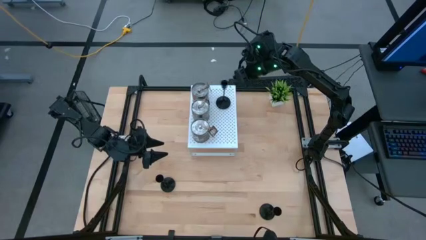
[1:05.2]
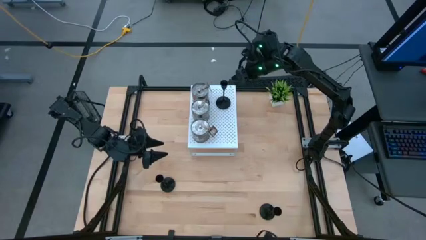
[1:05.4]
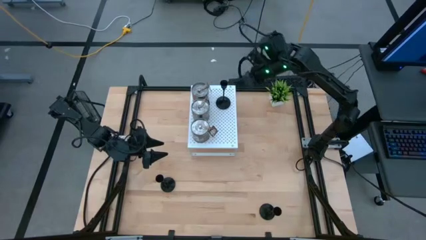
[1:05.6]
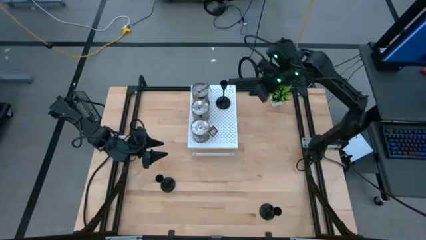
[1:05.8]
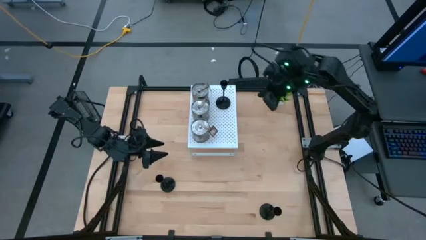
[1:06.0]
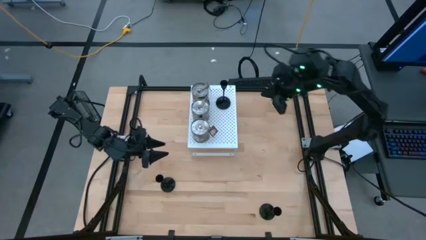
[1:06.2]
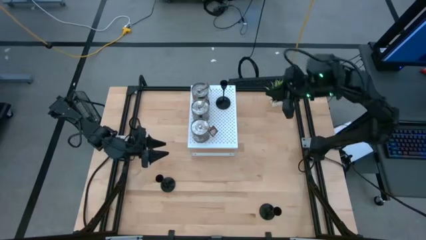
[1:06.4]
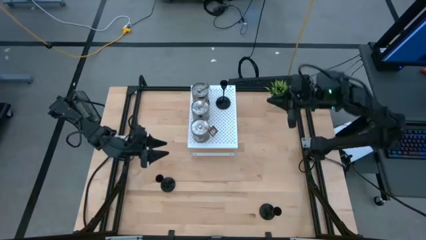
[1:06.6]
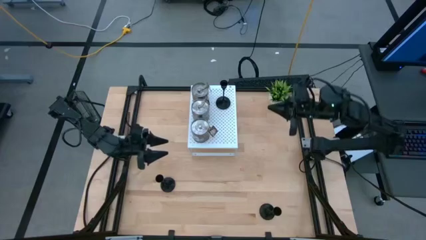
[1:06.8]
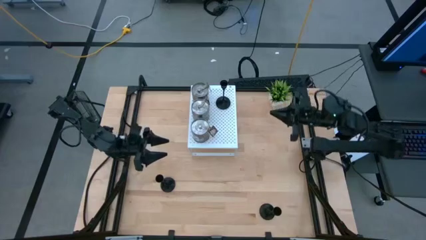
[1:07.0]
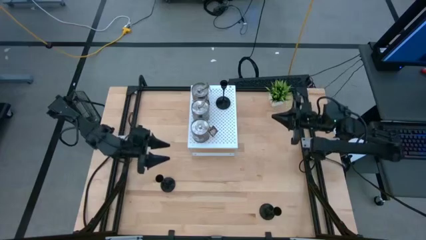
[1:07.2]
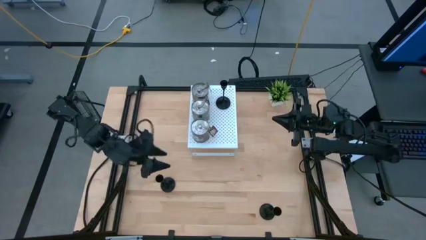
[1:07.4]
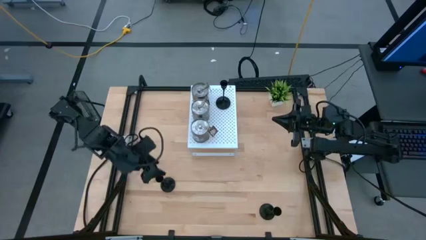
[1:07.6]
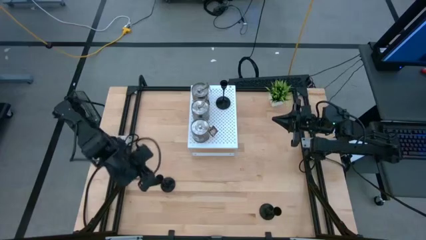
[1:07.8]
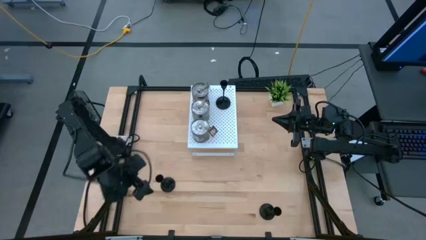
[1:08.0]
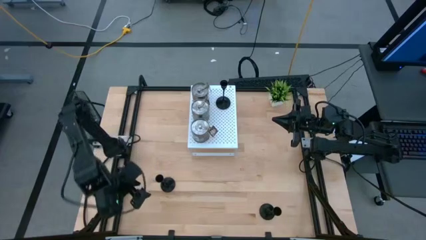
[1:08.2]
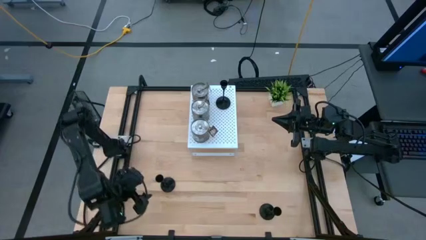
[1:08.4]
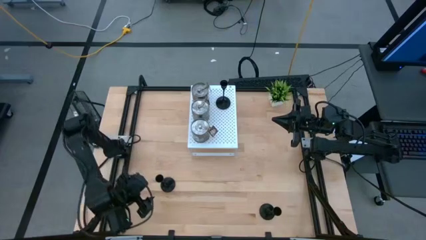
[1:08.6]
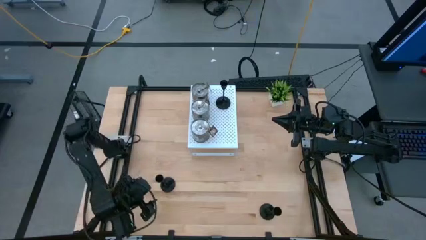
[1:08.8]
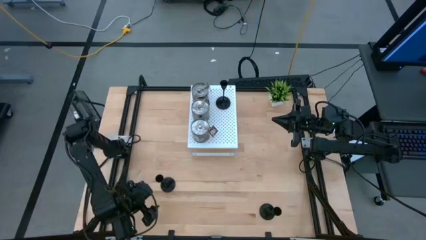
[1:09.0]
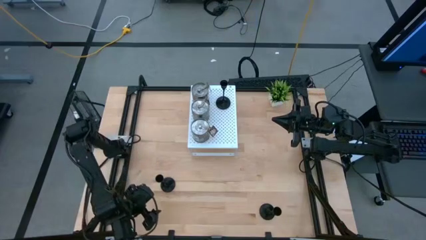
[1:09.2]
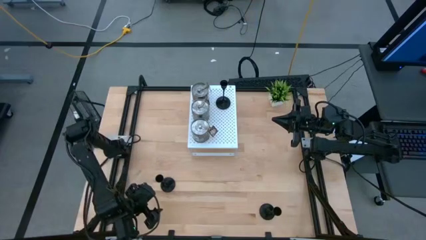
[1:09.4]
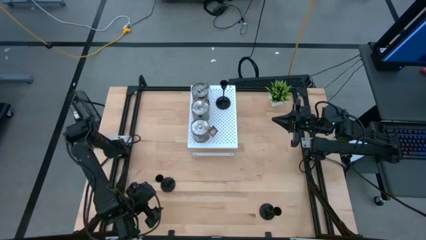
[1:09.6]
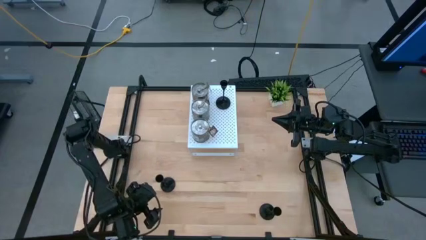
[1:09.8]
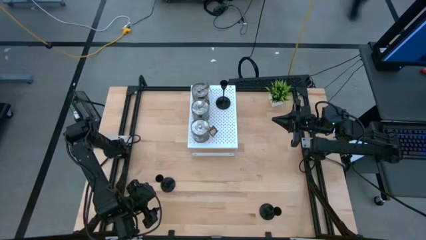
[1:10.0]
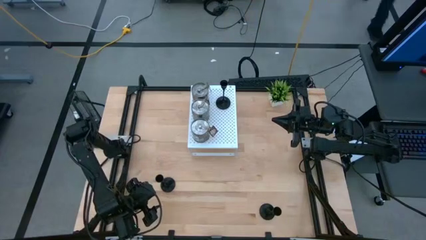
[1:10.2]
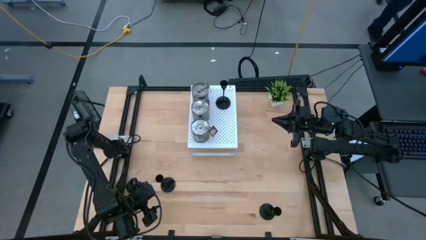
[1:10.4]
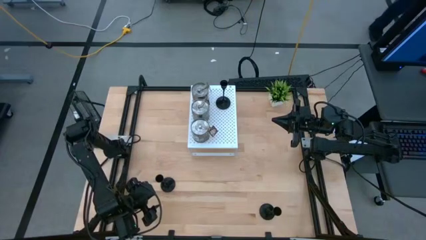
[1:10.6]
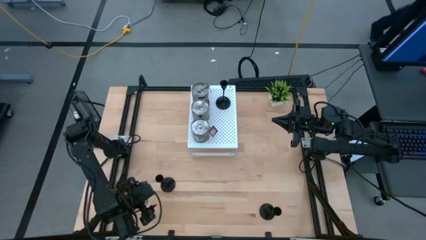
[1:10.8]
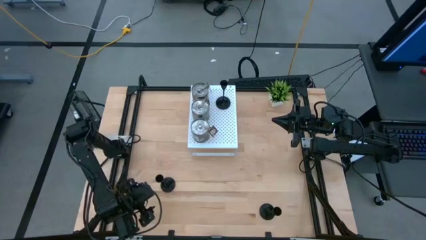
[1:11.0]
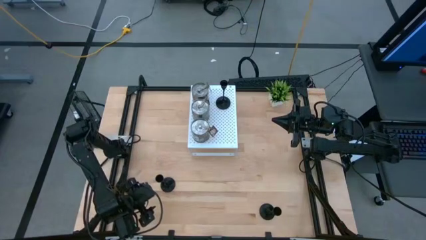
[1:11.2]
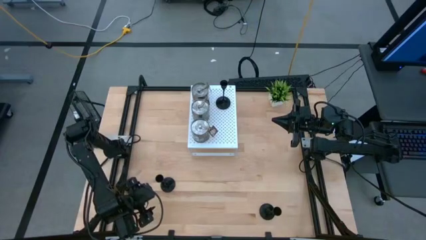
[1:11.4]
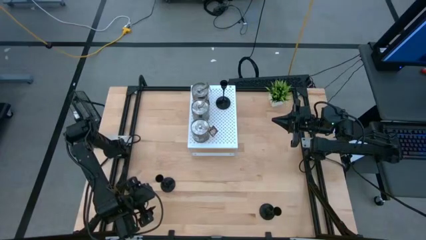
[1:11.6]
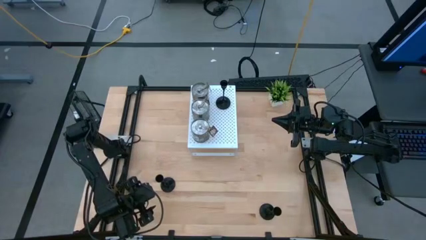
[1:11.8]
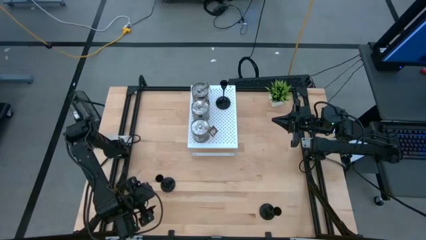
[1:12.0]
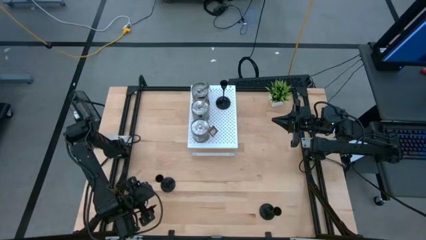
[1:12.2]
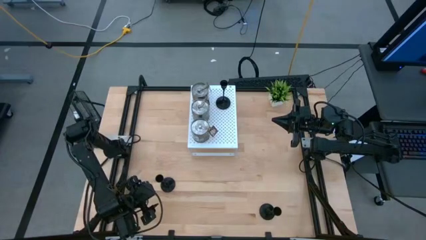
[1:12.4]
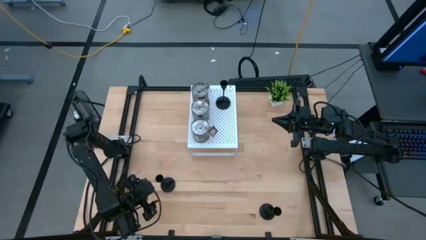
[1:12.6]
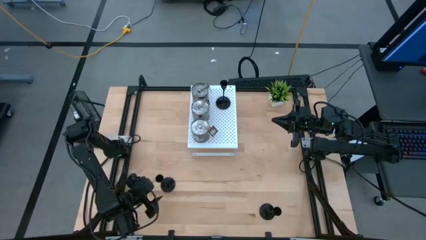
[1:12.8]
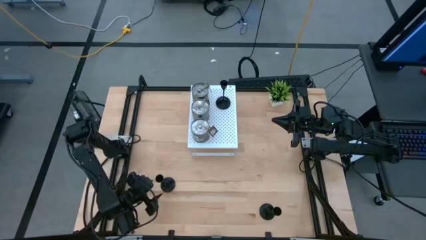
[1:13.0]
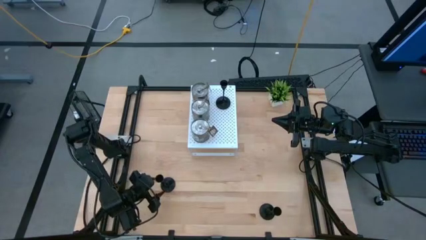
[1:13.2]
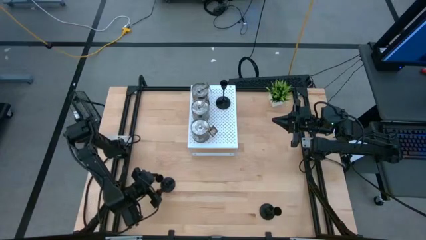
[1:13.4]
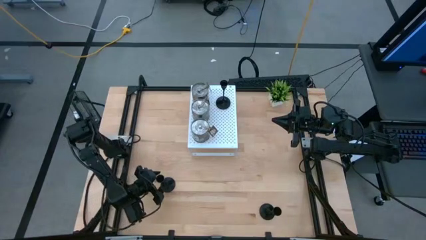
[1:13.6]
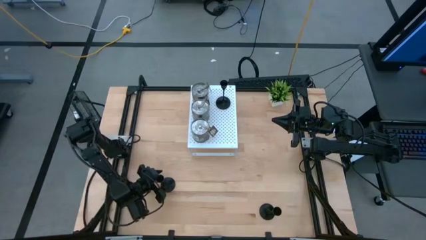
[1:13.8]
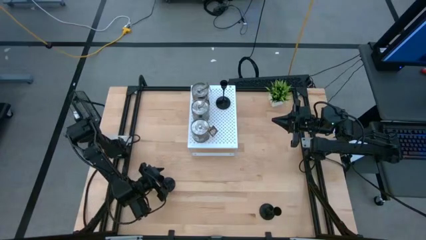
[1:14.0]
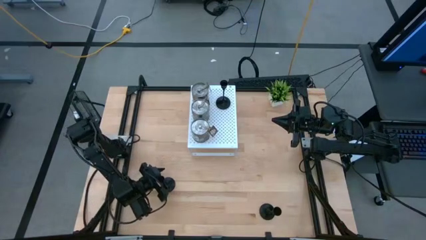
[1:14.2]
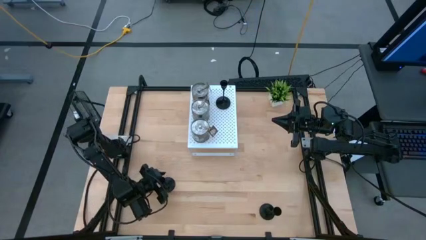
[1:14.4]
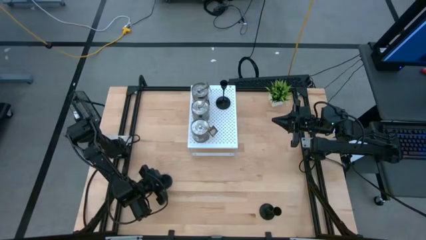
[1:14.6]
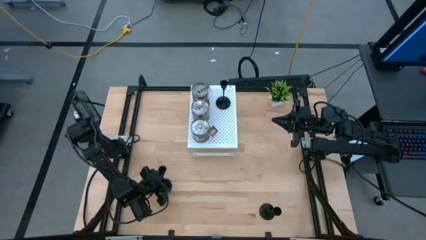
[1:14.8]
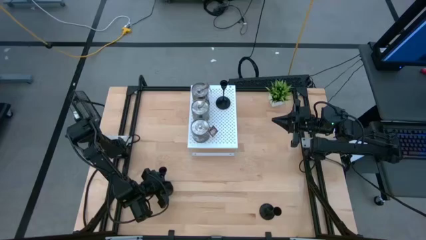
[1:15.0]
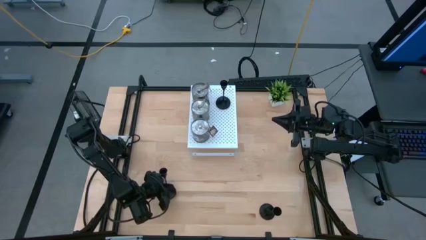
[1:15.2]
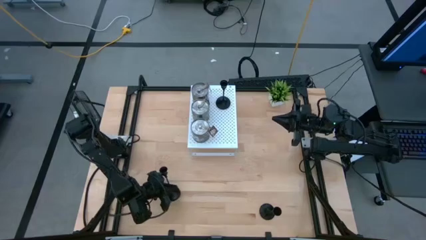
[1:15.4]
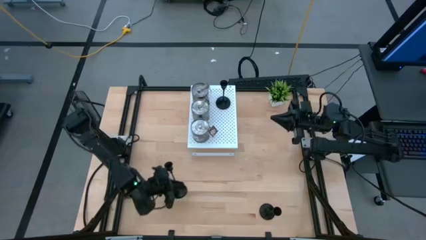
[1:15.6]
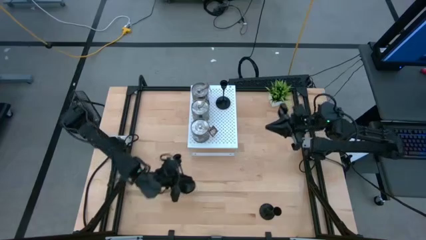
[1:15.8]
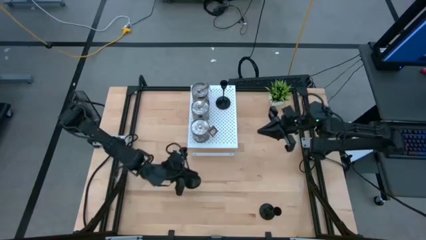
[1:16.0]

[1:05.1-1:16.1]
Task: Pick & Place candle stick holders
Put the left black candle holder on the shelf aligned with the other black candle holder

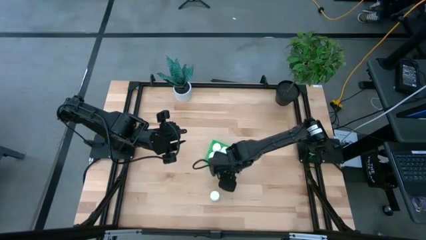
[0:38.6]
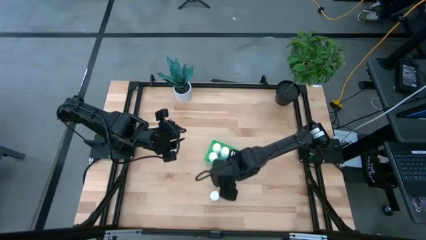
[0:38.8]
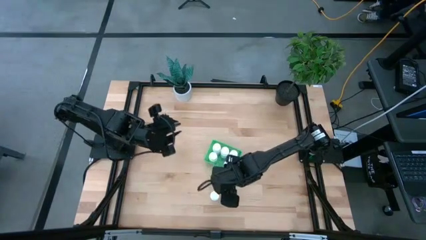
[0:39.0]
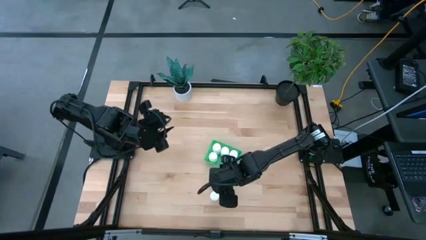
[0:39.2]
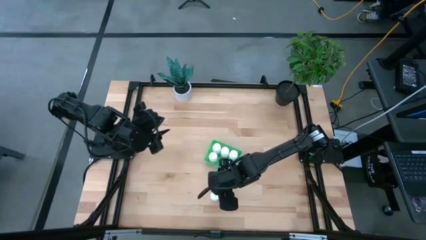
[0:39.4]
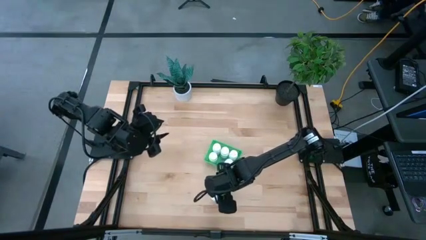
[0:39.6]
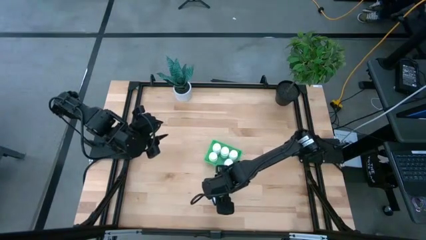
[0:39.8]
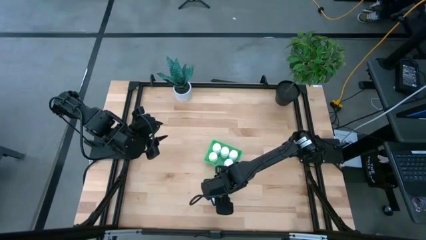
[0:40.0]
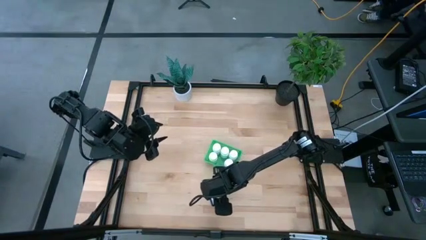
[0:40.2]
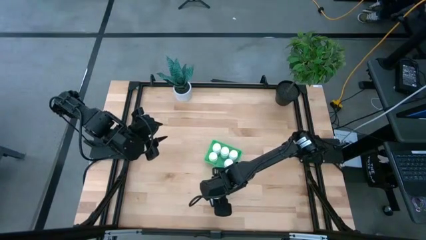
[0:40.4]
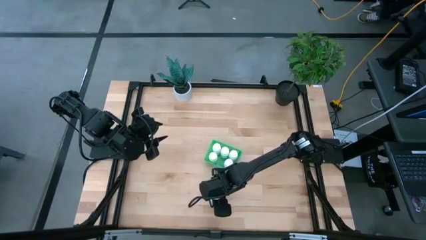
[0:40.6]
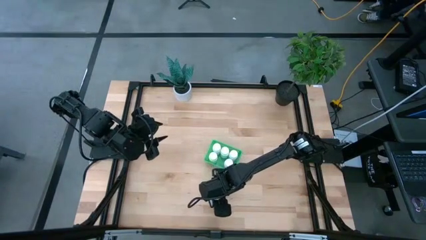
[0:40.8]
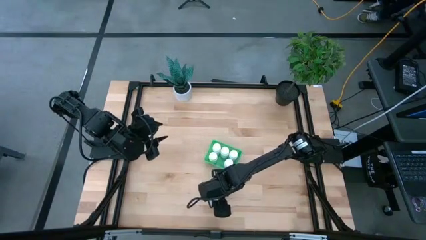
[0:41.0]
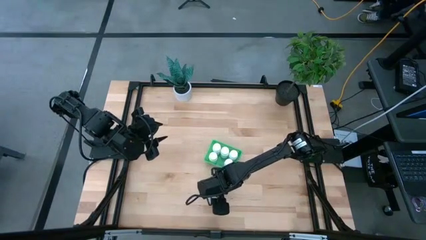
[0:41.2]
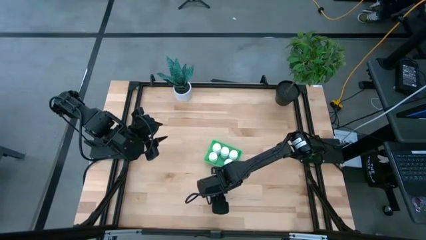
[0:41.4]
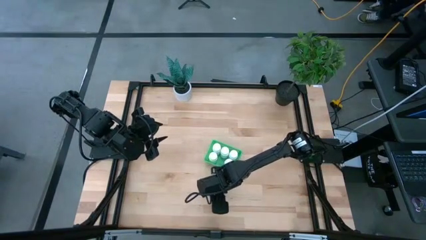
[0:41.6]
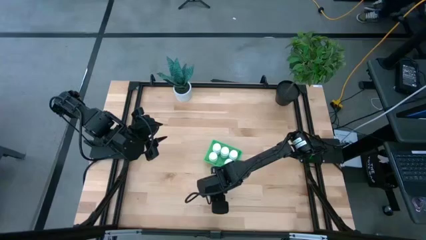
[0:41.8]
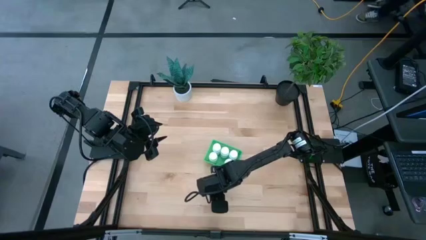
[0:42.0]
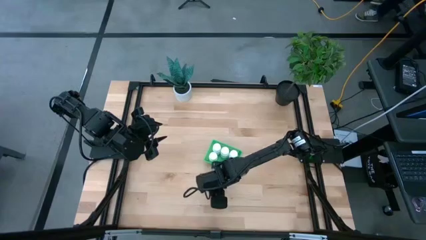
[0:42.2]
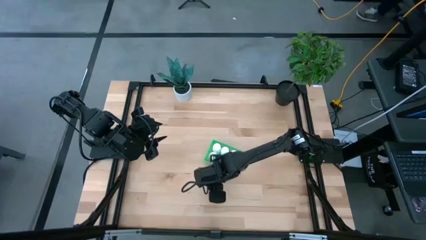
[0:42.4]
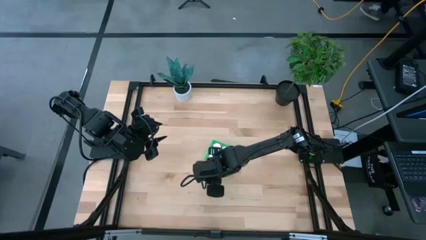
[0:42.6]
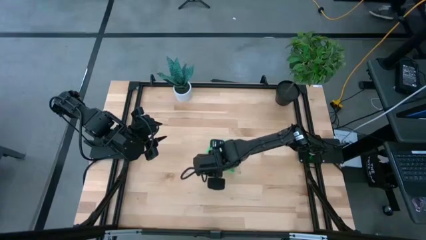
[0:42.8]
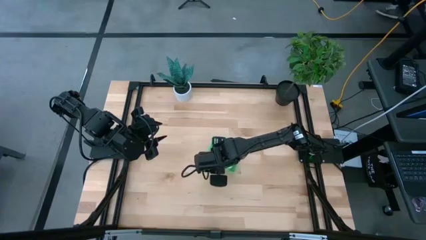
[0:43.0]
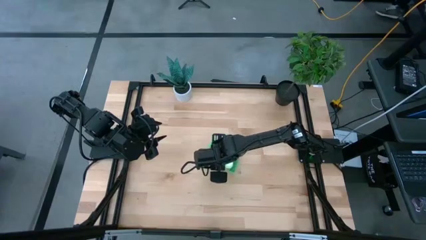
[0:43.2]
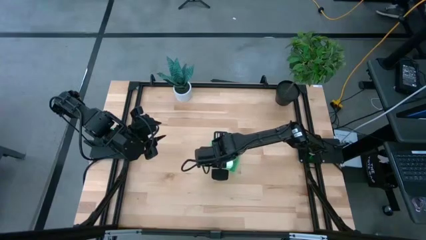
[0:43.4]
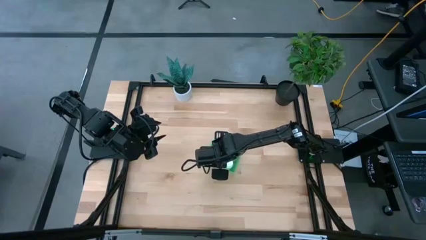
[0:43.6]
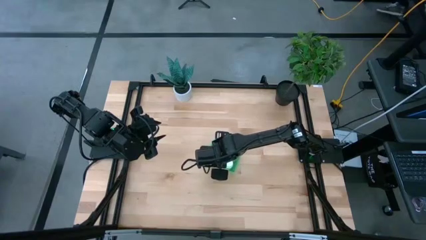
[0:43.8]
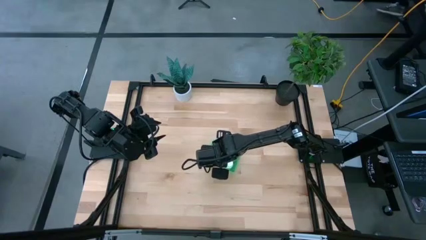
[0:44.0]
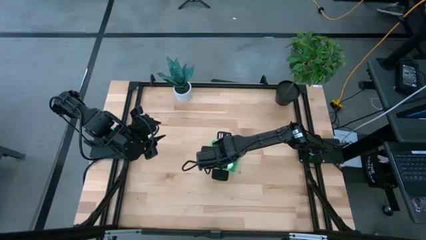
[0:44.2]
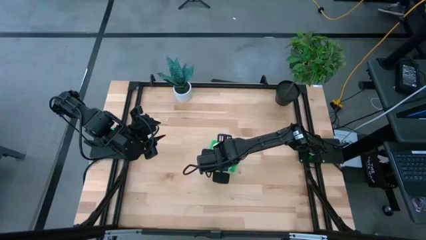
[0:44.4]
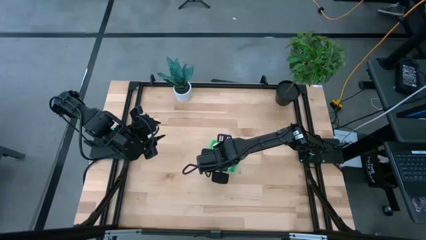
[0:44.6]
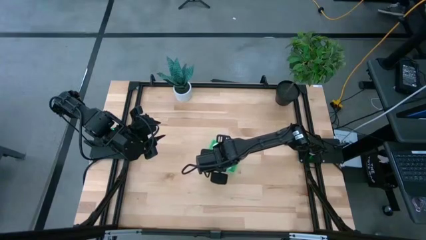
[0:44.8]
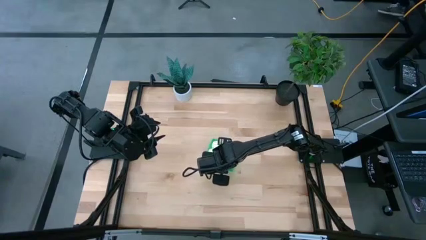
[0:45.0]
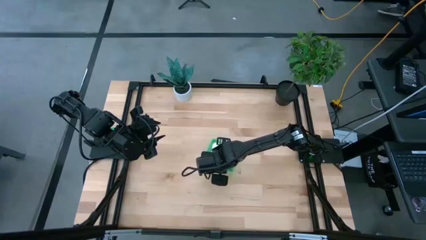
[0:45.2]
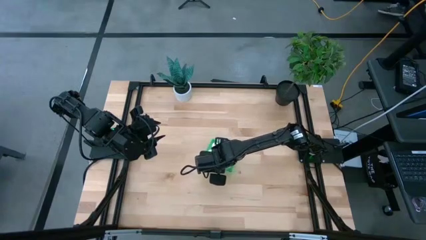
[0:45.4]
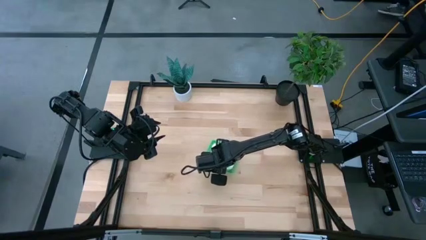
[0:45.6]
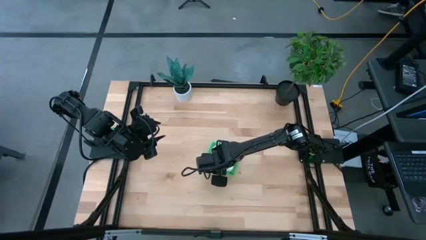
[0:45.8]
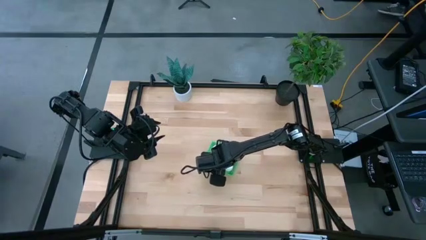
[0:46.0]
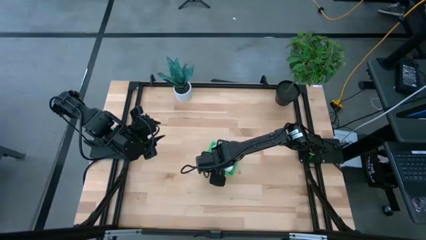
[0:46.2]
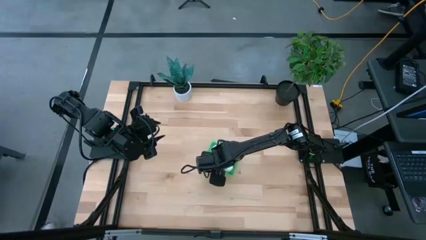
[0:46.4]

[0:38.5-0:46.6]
Task: Pick and place pill bottles into a basket
Put the white pill bottle into the green bin
